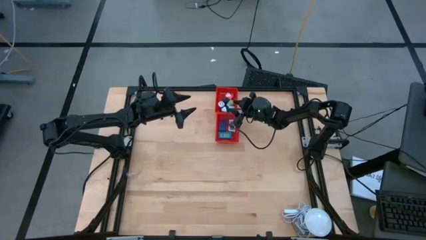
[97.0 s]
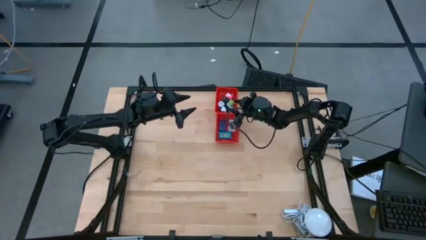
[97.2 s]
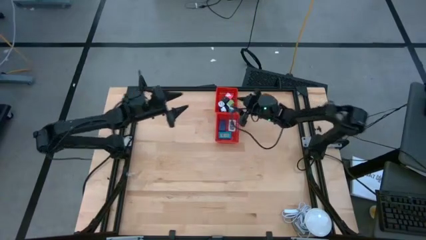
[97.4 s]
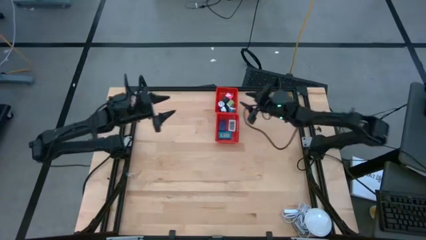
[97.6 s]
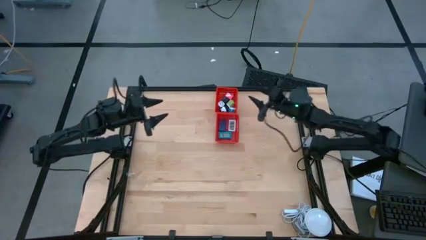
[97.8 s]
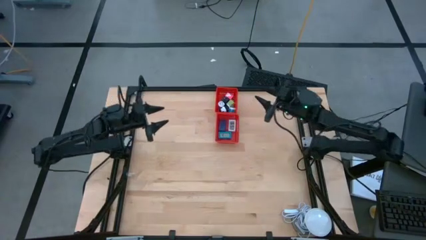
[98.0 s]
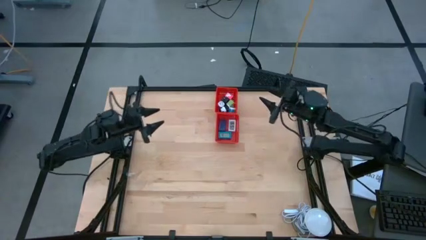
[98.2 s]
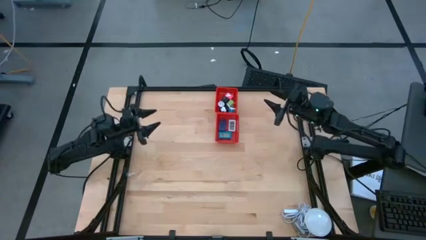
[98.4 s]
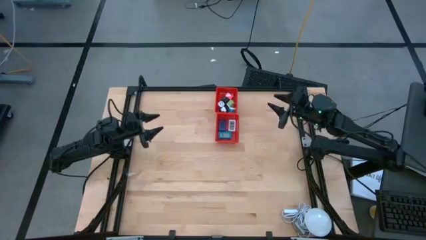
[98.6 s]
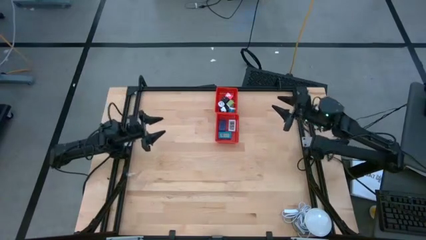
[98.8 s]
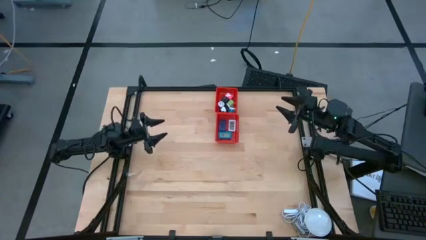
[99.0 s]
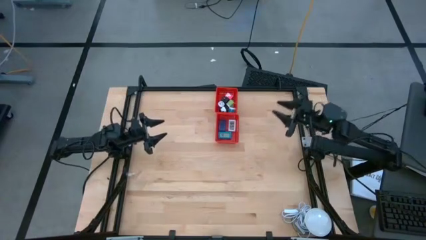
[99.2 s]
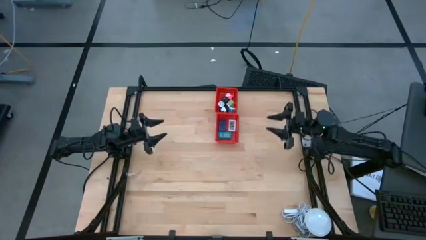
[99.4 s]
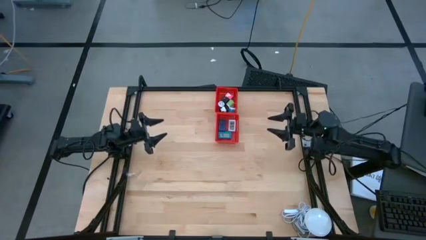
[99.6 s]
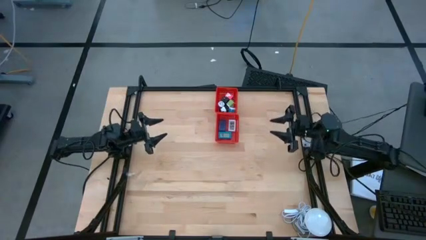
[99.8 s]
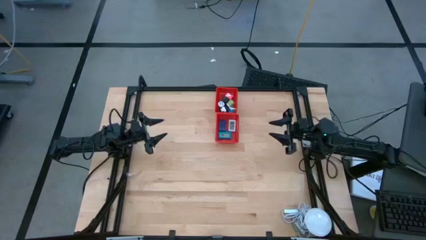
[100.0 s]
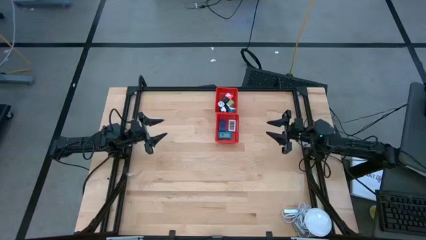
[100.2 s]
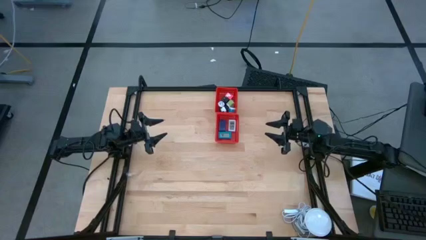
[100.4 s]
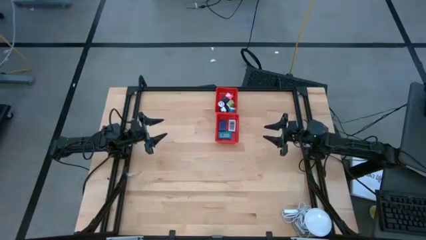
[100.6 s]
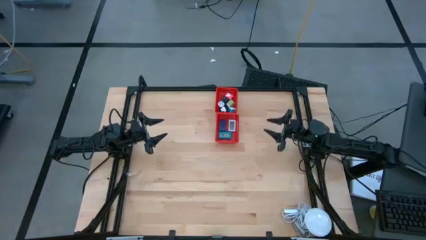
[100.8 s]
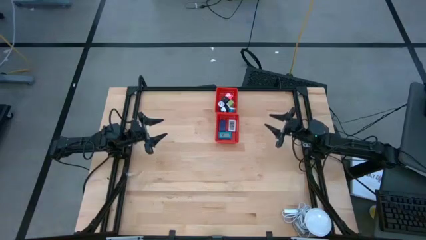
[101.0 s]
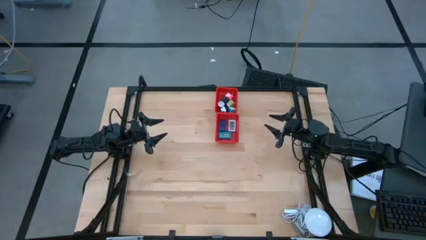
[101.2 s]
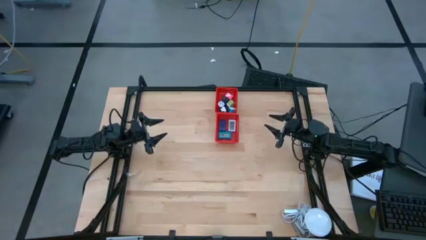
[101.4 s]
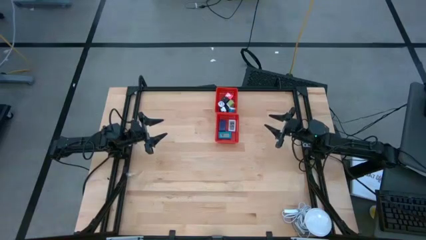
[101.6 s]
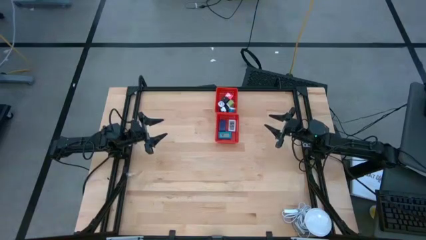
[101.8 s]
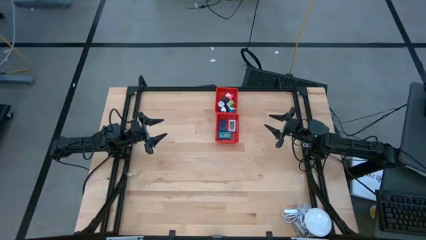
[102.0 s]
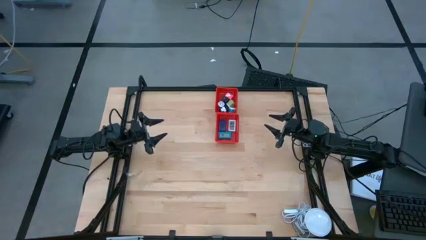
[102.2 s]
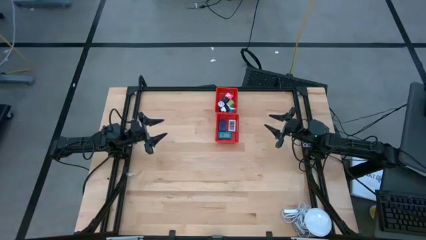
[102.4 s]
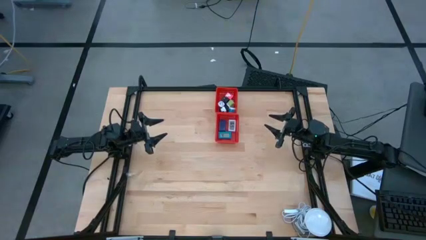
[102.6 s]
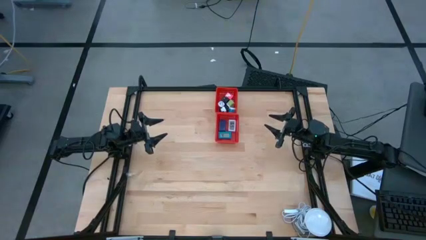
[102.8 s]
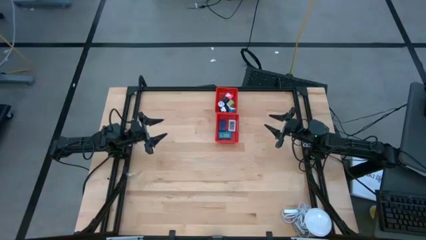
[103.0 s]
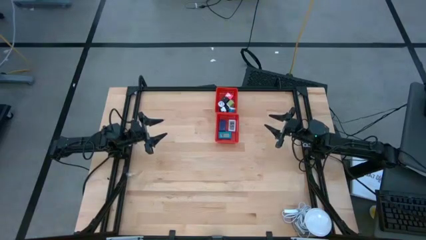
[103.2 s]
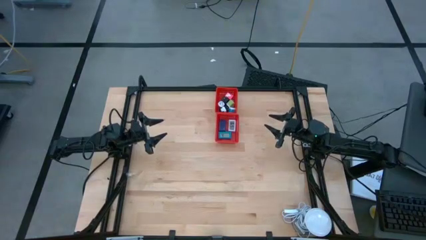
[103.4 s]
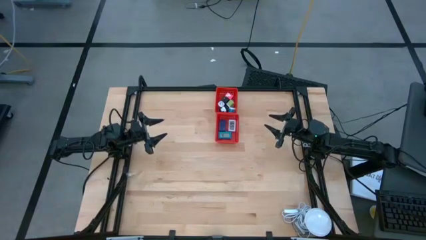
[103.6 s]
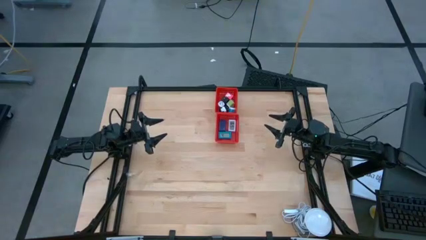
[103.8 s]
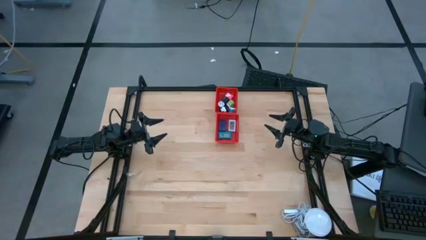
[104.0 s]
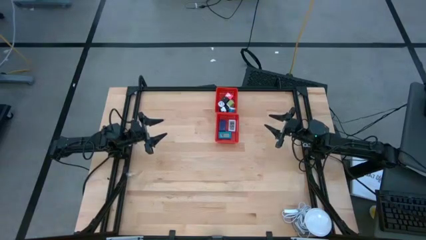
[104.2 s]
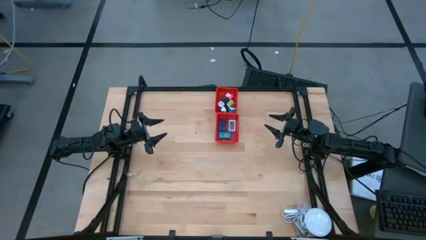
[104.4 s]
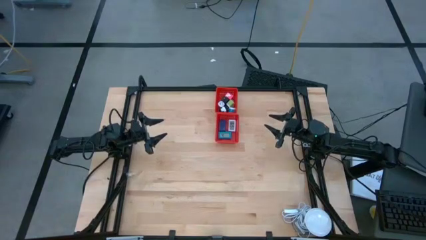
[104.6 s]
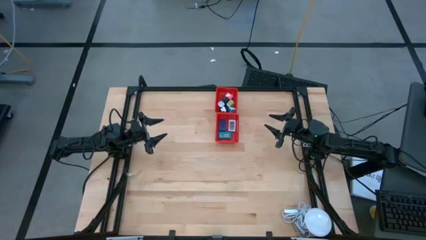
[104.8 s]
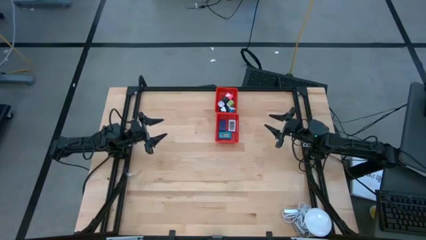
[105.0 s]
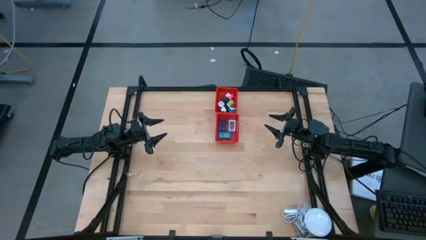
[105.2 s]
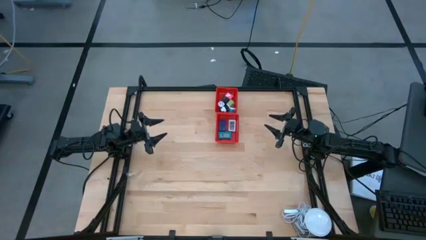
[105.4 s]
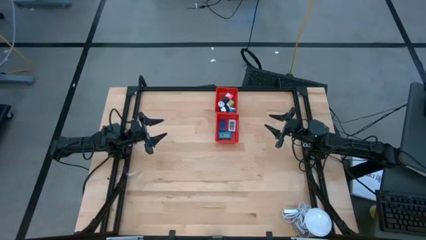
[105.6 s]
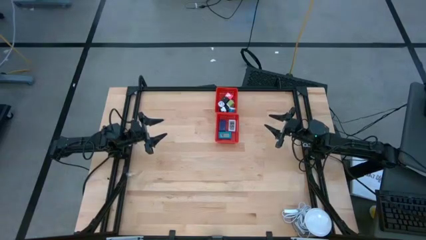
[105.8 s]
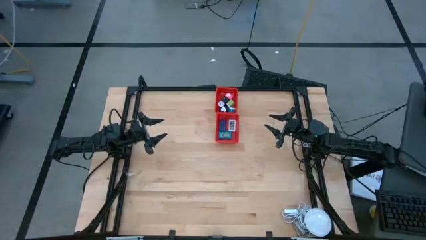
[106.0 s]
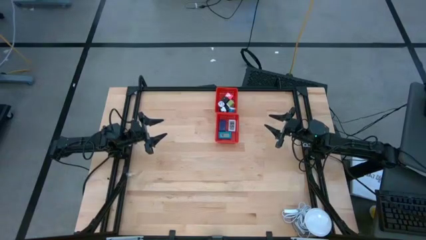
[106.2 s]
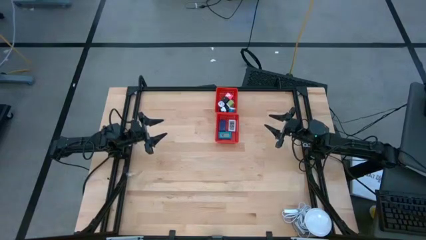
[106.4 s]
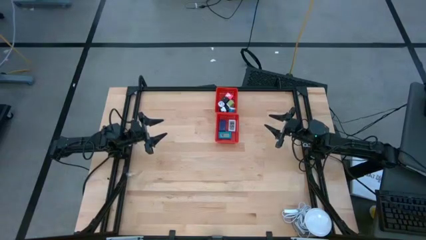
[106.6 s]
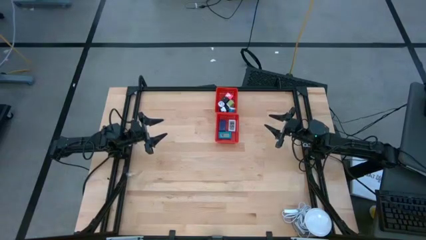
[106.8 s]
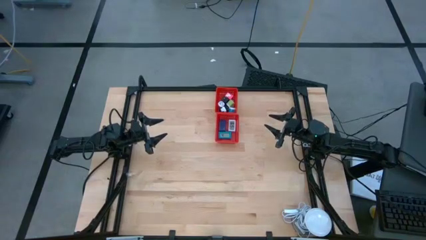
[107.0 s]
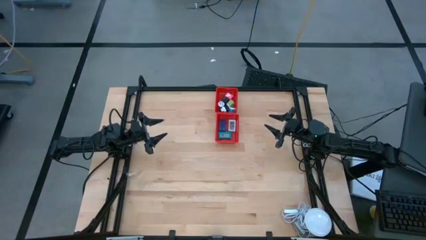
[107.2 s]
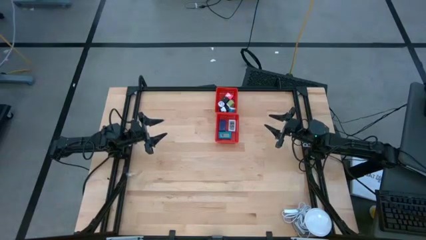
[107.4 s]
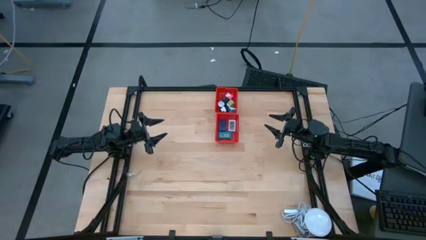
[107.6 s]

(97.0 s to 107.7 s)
Task: Pick & Place Office items
Return to Home Position

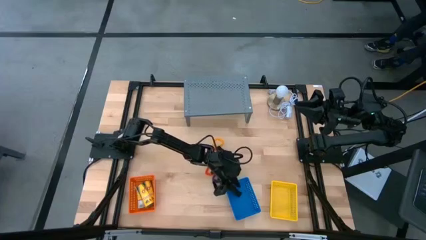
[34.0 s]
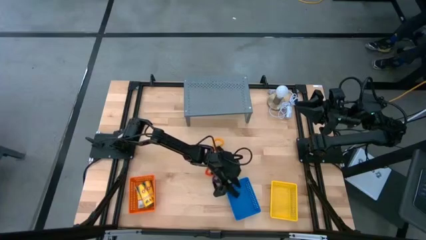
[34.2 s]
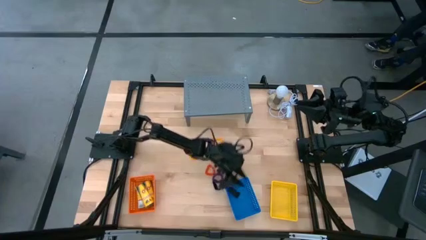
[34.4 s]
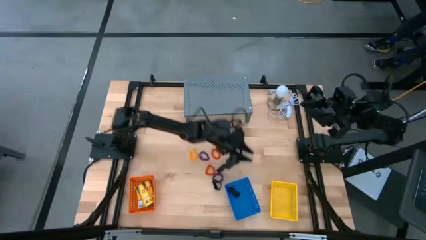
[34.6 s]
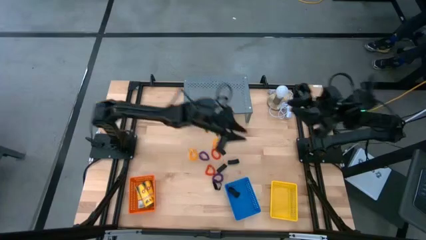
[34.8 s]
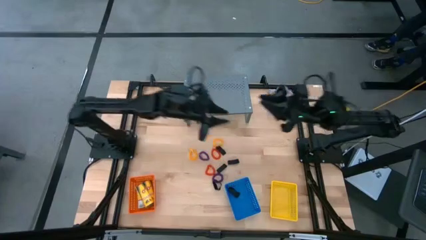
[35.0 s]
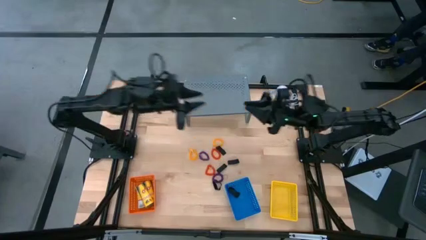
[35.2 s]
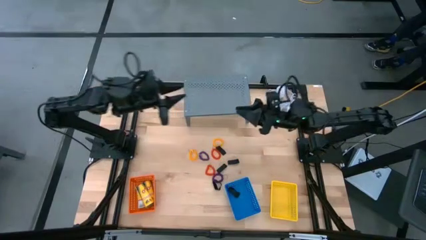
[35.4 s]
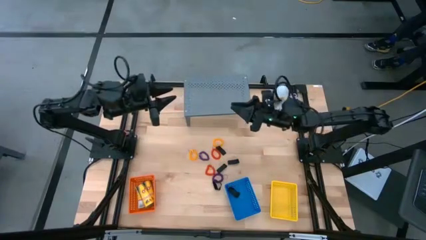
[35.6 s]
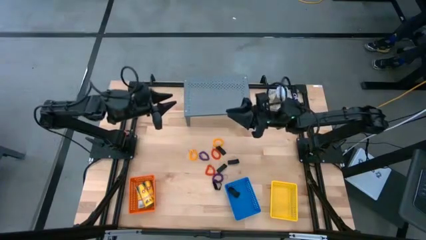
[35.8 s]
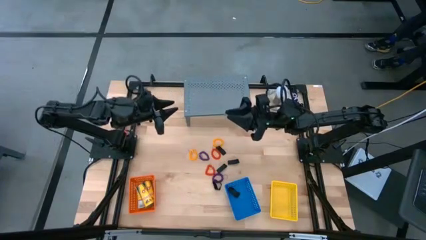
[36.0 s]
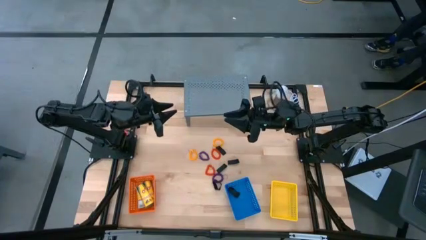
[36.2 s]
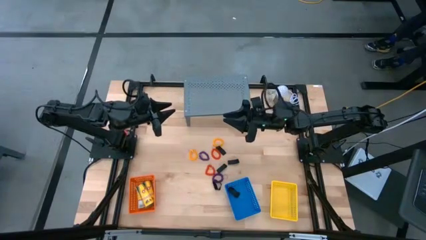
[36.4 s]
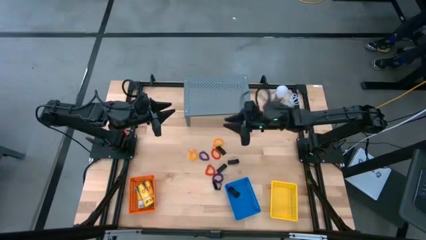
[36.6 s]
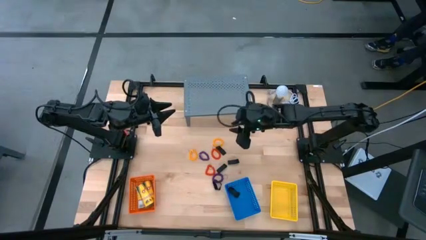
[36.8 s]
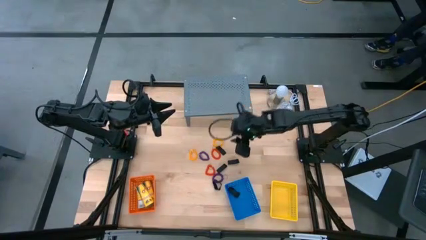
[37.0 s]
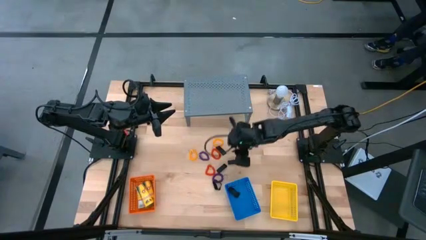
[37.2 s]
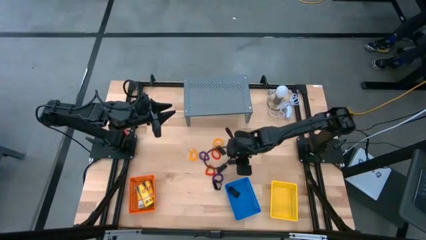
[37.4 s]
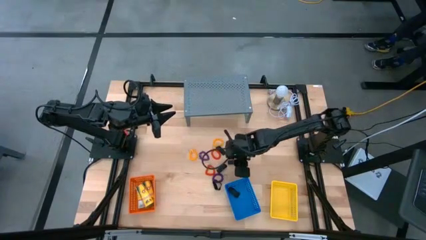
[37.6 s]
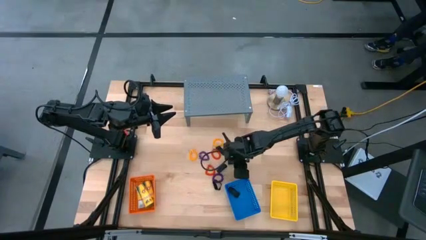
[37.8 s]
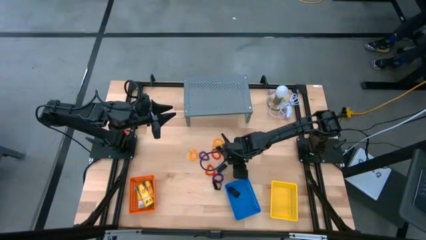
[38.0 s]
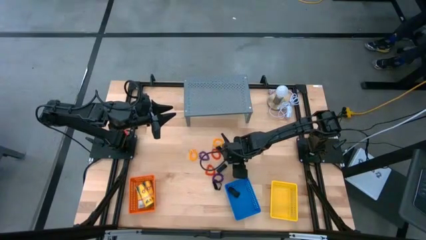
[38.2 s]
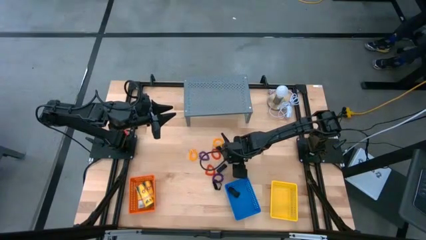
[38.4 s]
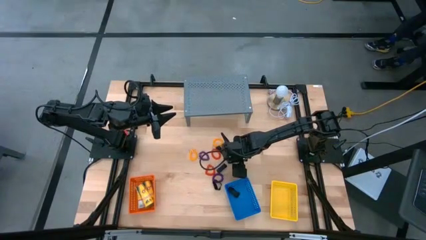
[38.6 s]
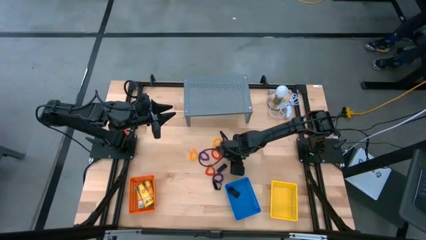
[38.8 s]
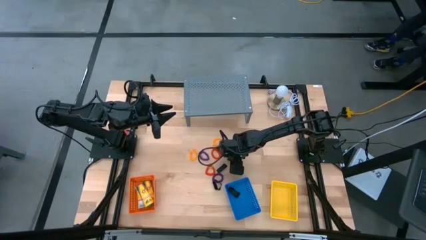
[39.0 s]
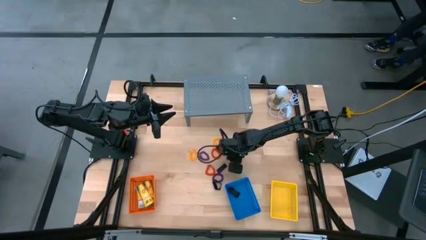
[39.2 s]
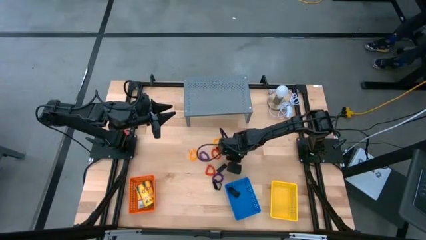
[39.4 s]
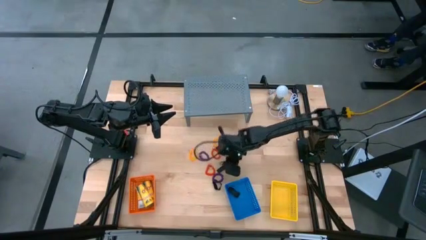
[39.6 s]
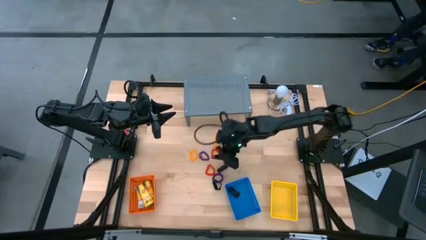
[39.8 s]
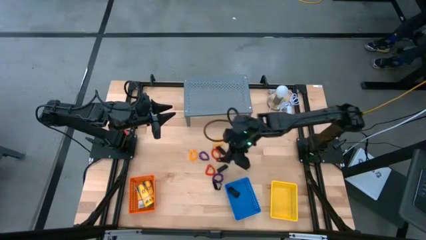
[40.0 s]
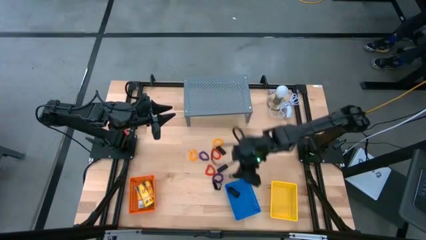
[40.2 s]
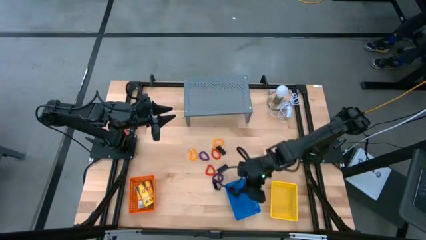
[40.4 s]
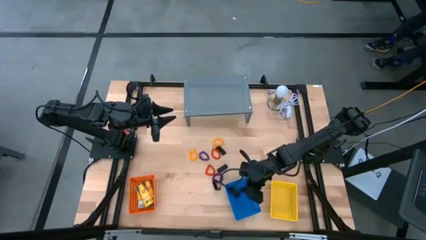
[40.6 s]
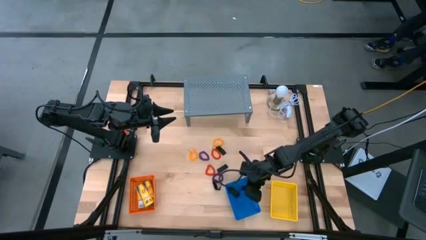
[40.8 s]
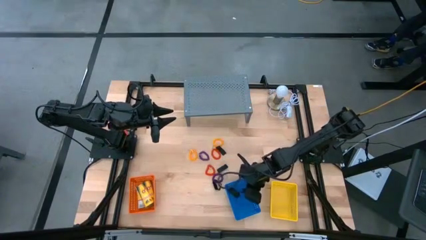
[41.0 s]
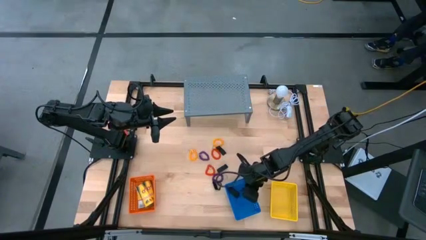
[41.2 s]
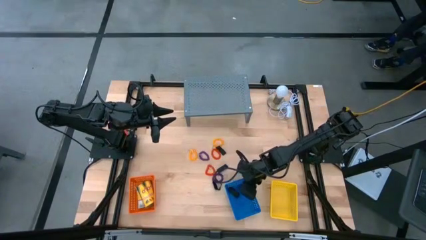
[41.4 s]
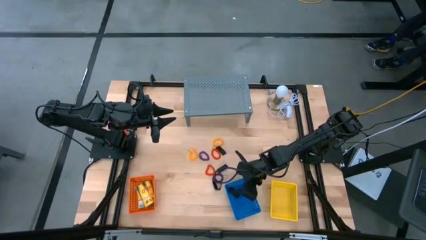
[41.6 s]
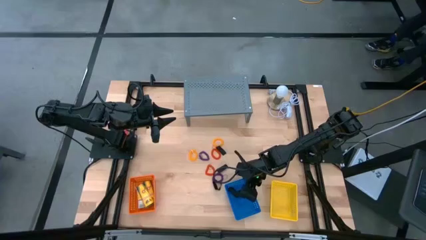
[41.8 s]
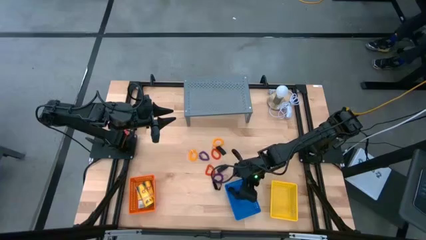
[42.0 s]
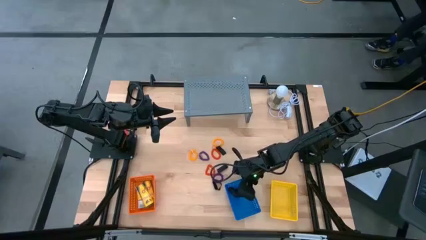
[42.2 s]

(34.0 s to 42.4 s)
Task: Pick & Place Office Desk Supplies
Put the black rubber band into the blue bin
